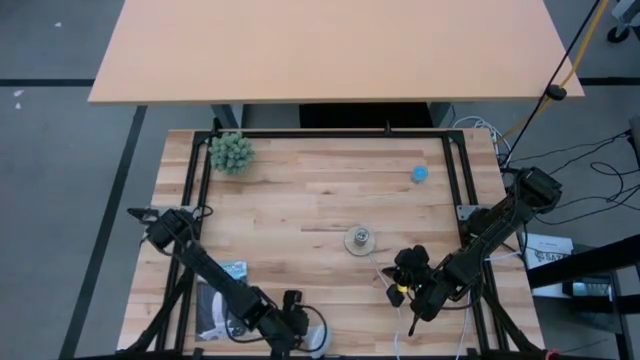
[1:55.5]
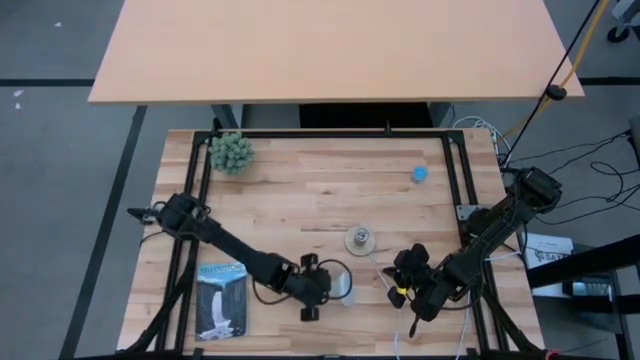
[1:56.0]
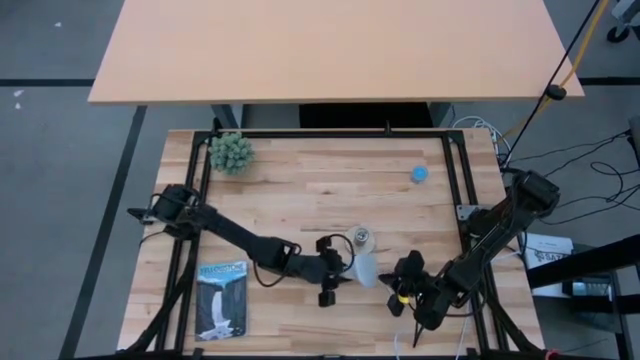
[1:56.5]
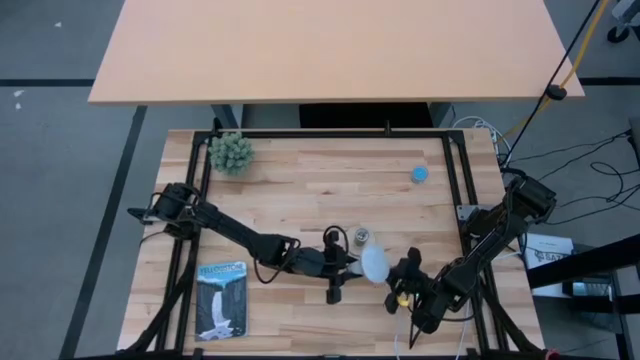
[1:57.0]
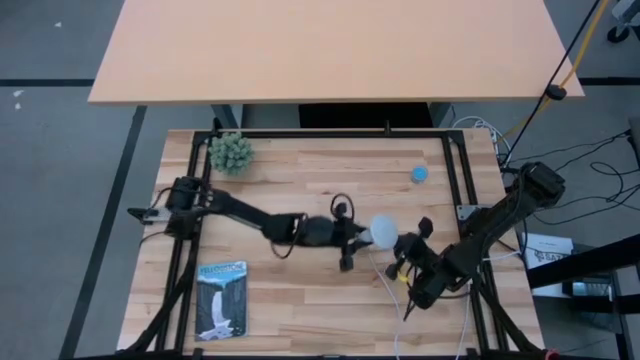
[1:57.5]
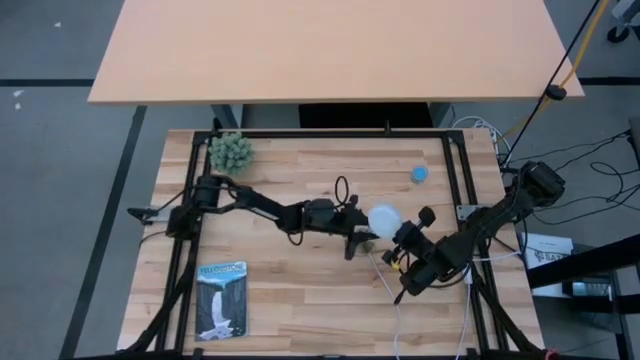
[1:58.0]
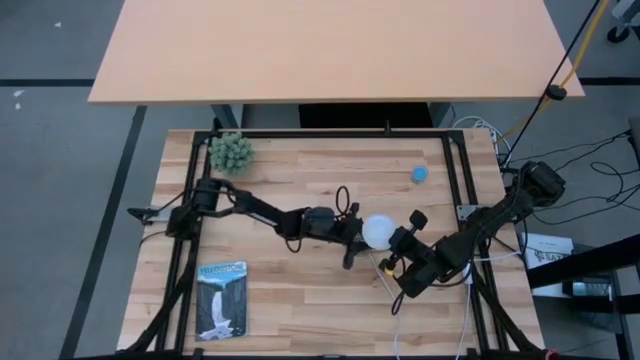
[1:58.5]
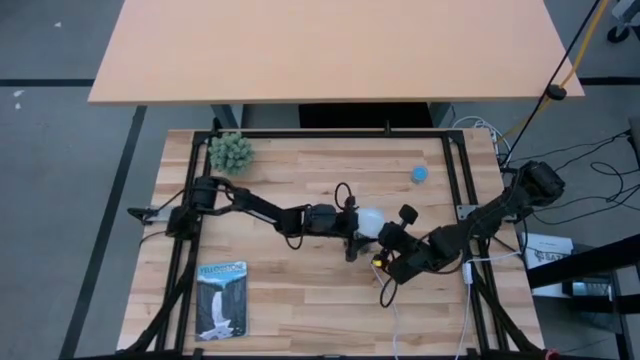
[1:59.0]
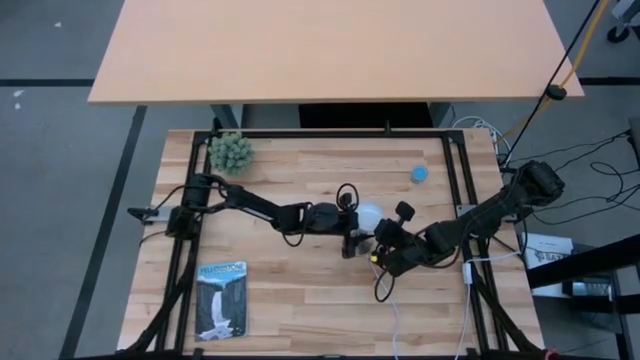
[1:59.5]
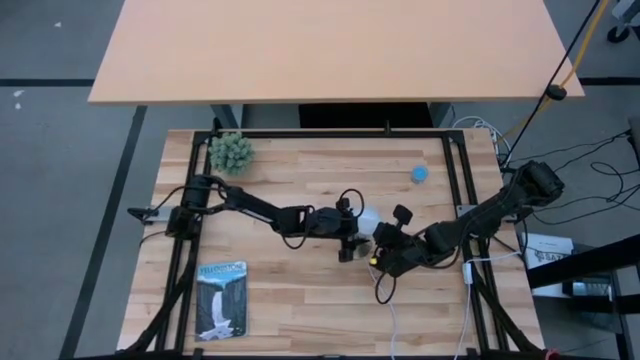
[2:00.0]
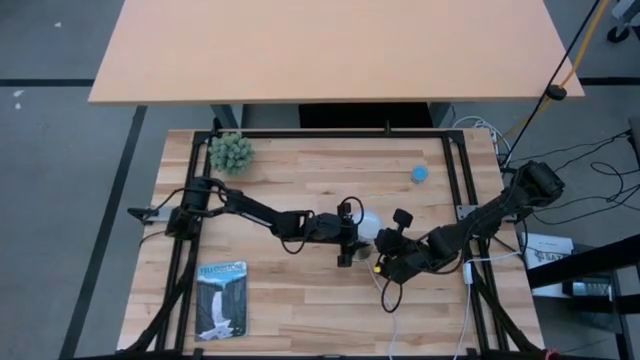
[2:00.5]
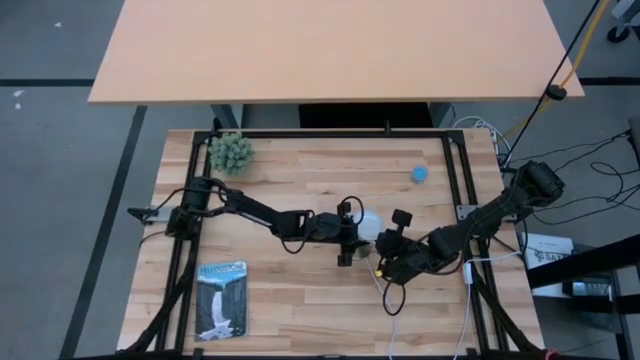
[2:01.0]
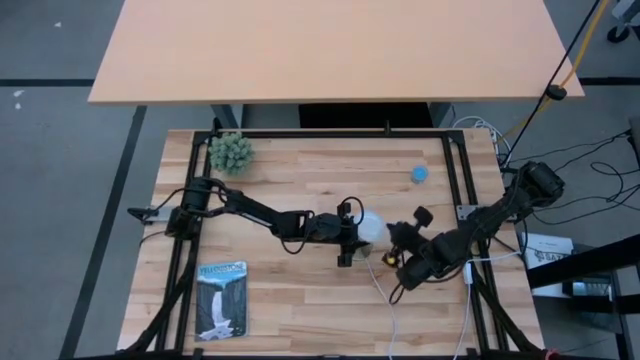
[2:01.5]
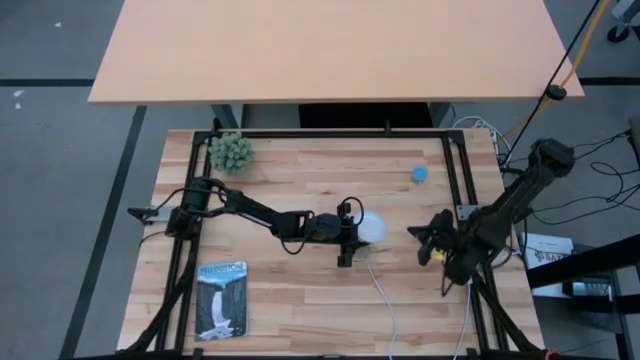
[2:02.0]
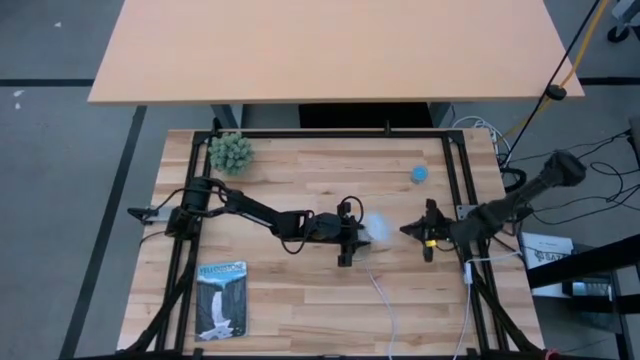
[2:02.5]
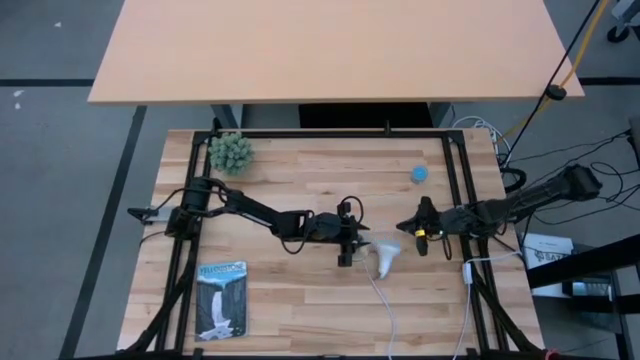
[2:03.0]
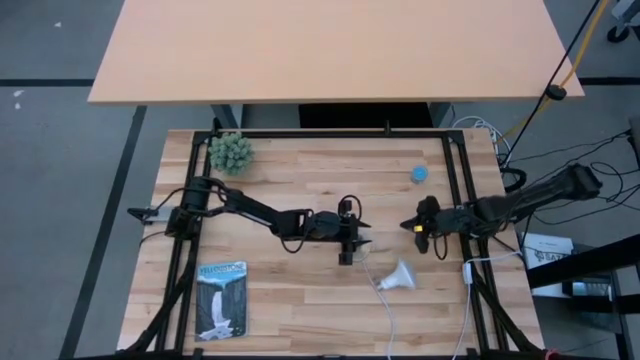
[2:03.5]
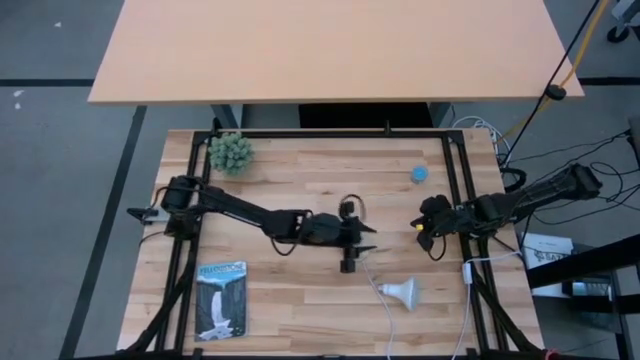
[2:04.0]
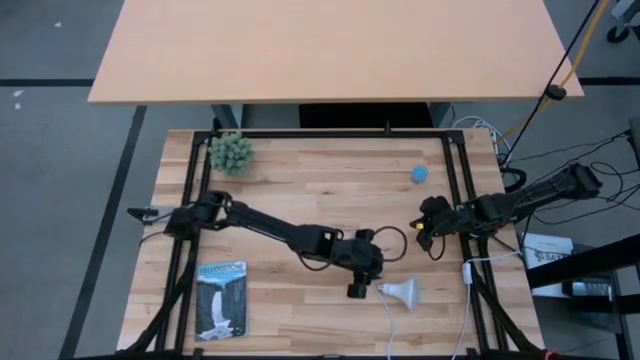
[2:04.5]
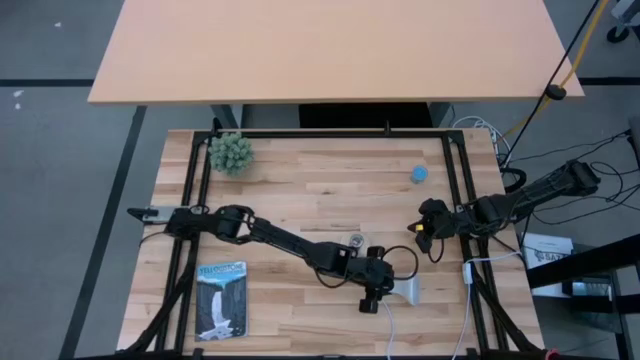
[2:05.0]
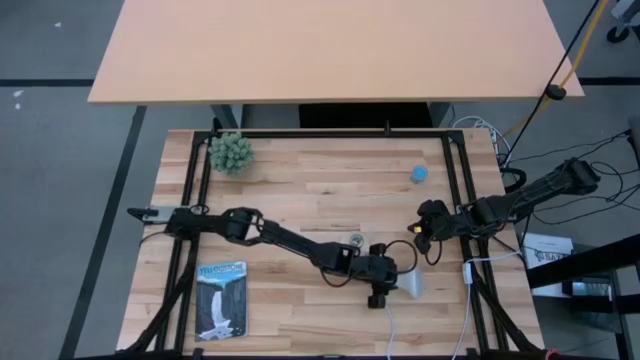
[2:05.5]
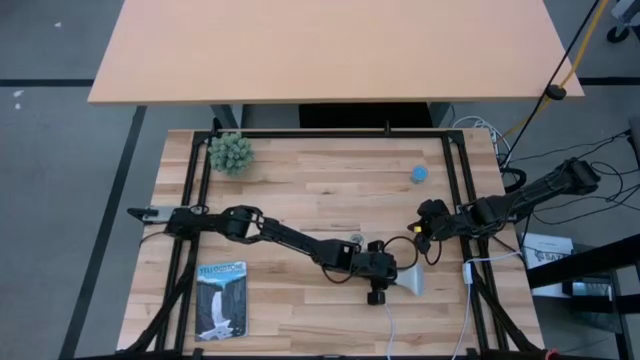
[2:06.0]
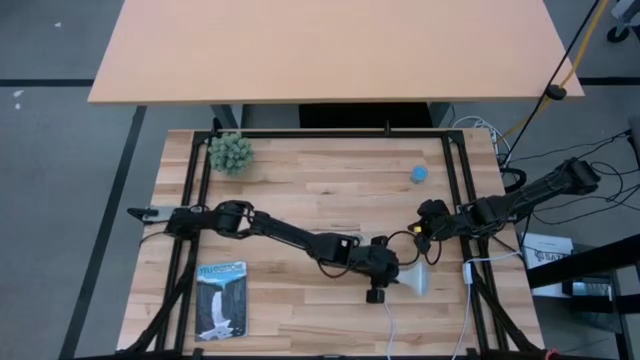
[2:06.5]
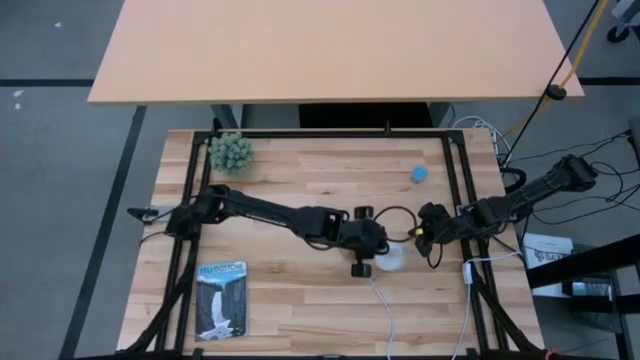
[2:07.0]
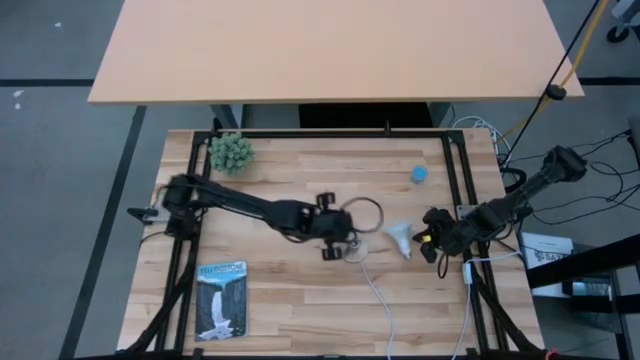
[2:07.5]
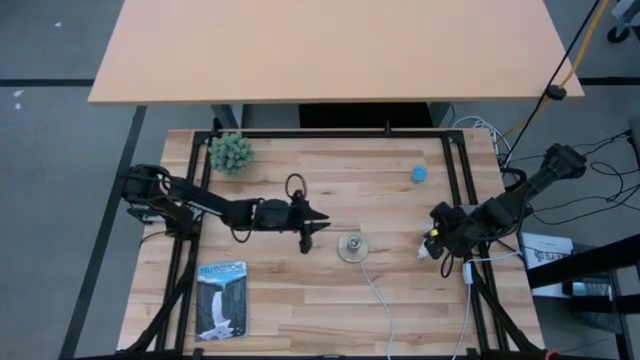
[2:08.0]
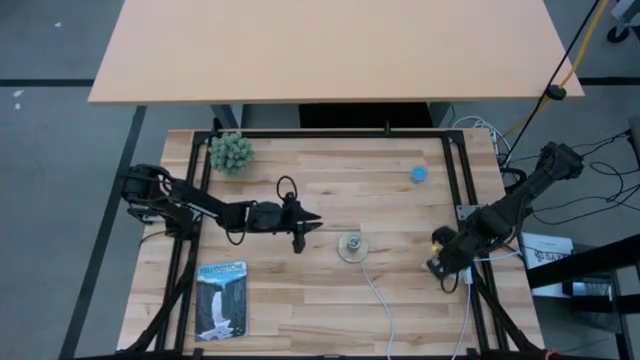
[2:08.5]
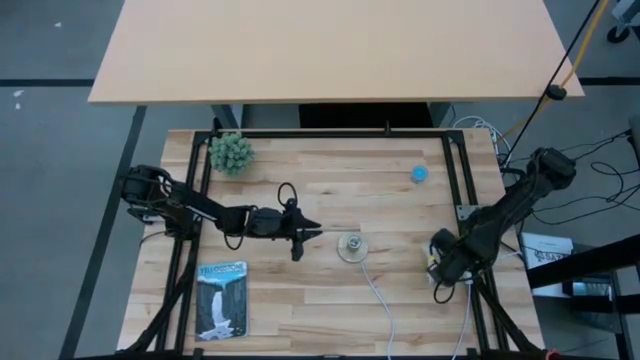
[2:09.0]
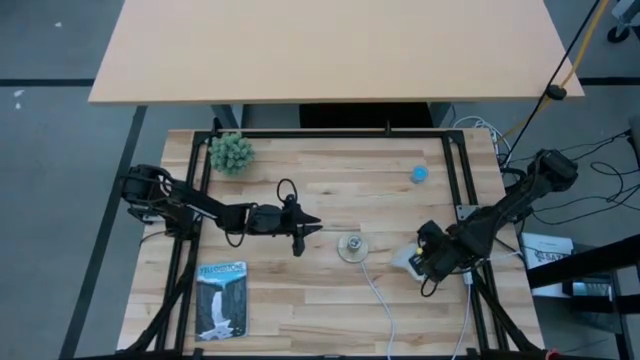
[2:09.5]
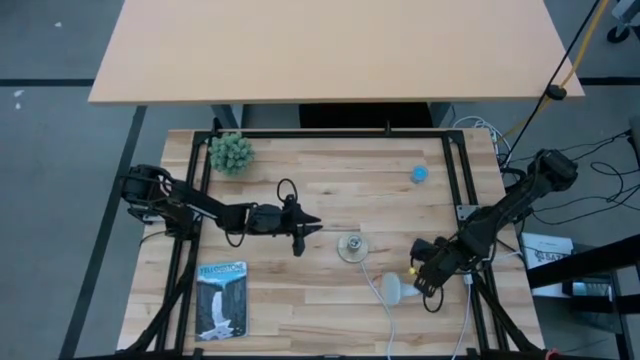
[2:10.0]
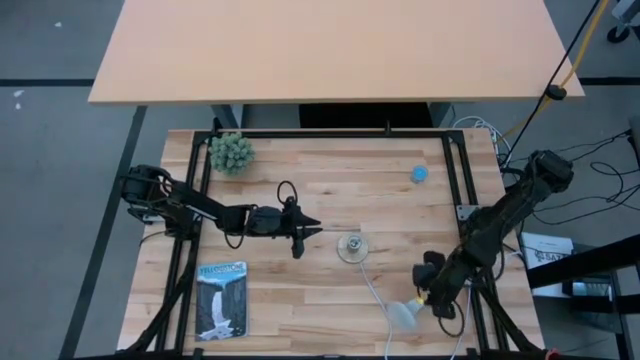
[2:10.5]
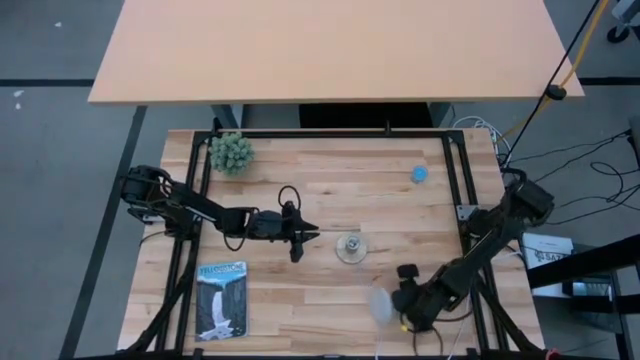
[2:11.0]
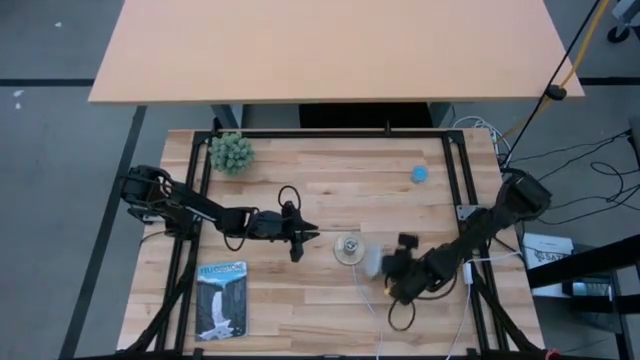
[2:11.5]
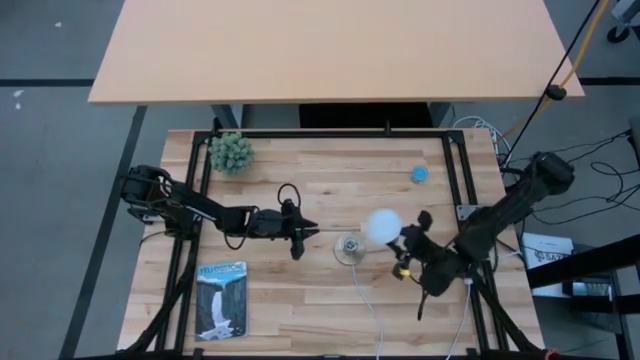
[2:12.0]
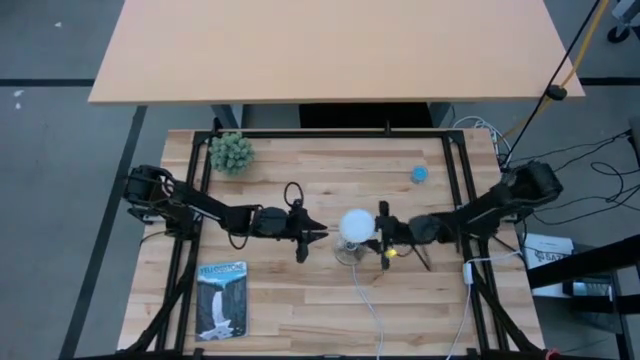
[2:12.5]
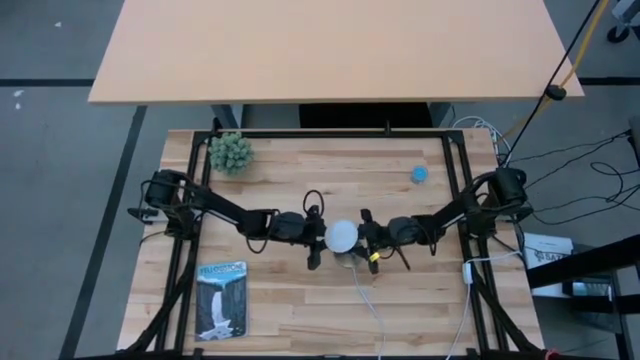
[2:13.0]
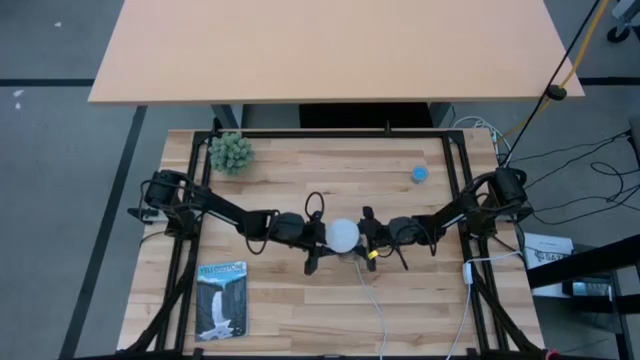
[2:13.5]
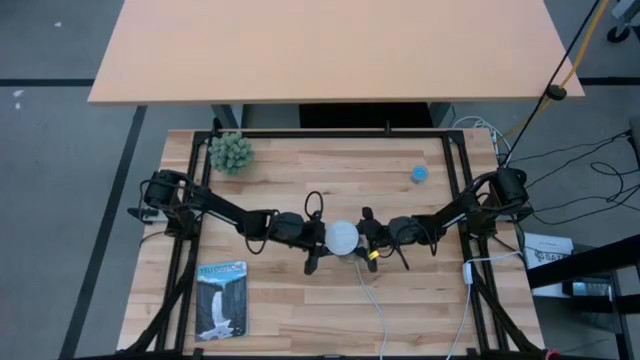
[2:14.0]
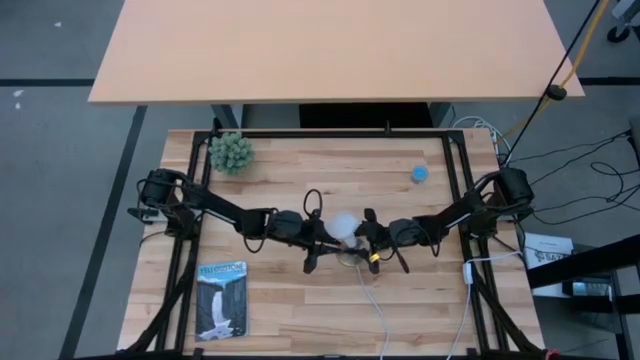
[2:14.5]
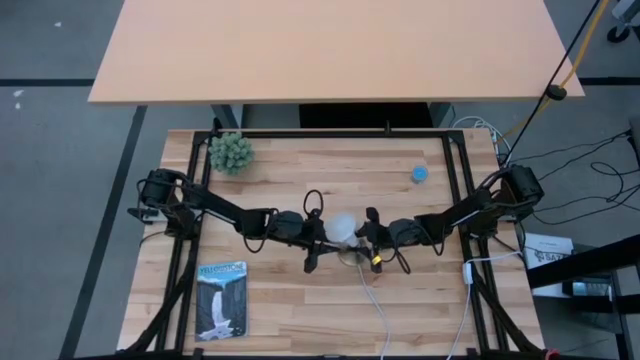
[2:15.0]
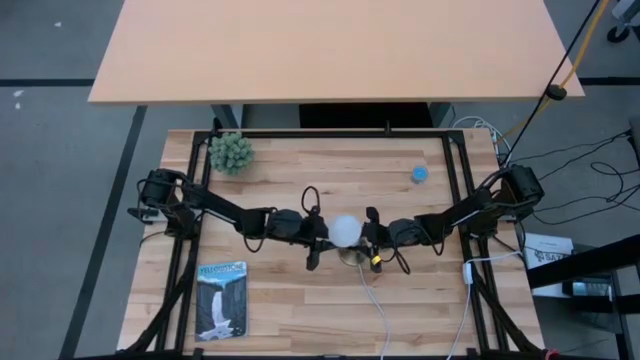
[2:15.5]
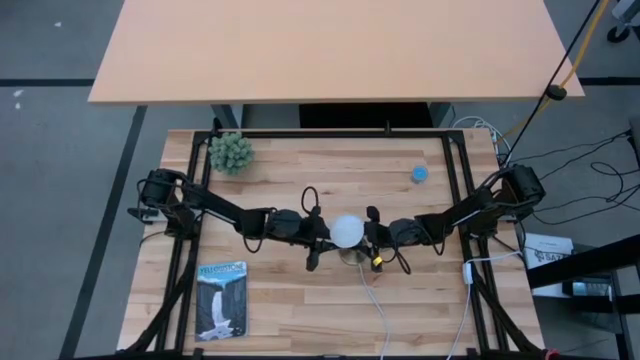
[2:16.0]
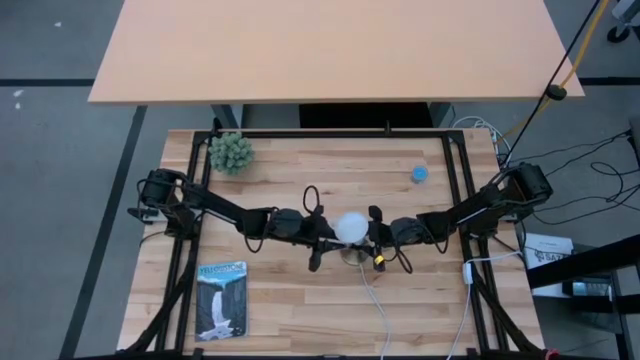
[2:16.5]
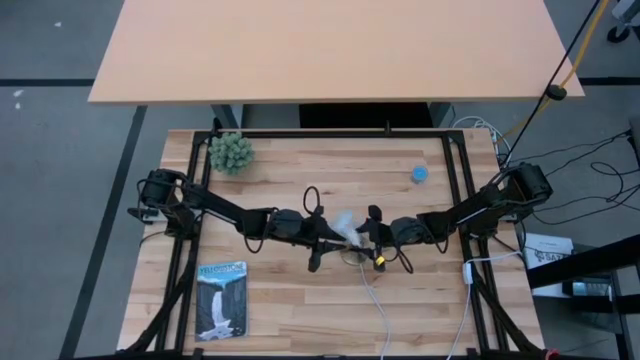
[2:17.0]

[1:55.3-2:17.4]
Task: Screw lightbulb
Insert the lightbulb into the desk lamp
